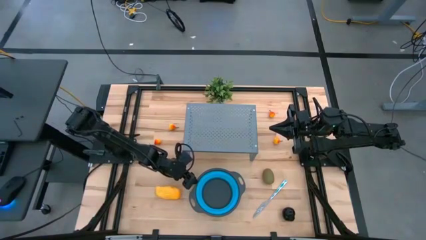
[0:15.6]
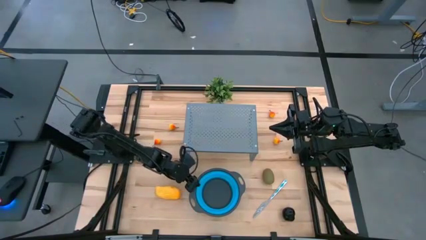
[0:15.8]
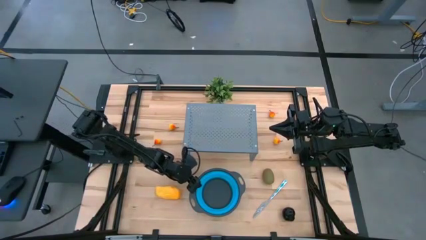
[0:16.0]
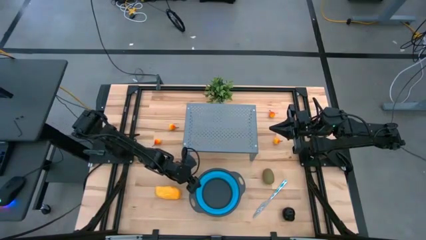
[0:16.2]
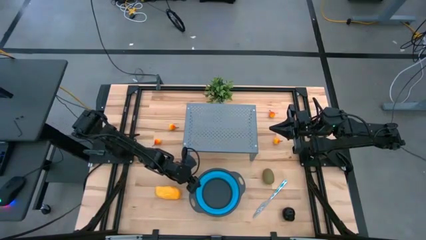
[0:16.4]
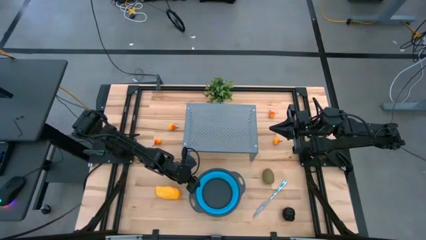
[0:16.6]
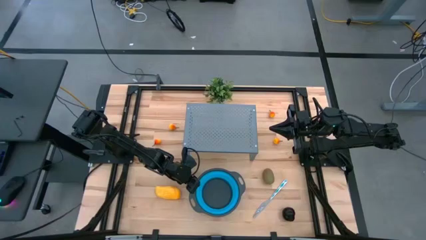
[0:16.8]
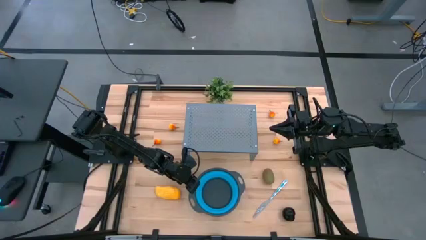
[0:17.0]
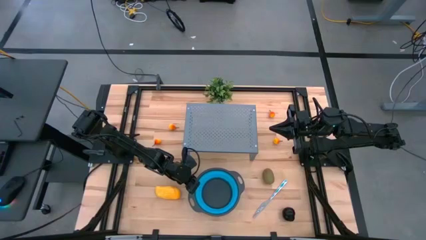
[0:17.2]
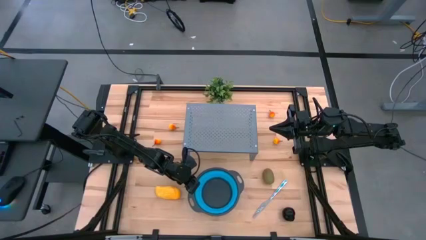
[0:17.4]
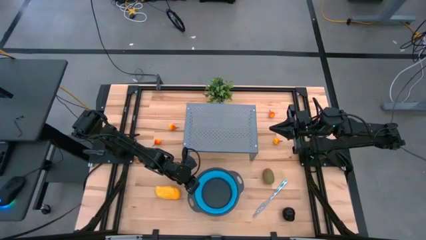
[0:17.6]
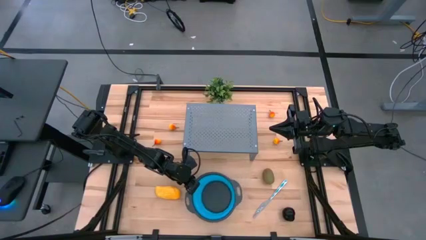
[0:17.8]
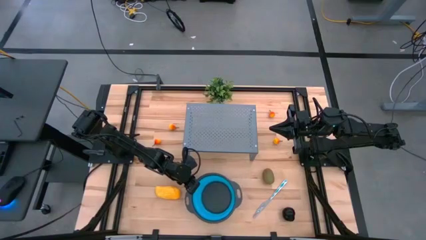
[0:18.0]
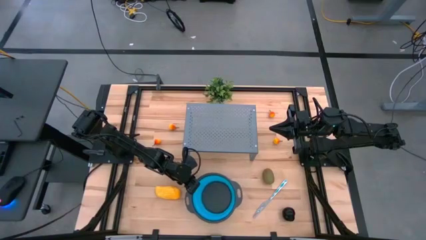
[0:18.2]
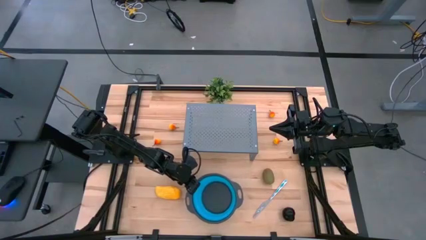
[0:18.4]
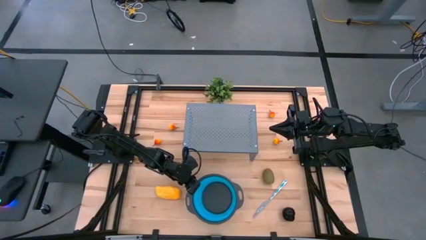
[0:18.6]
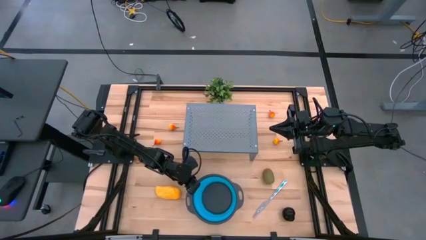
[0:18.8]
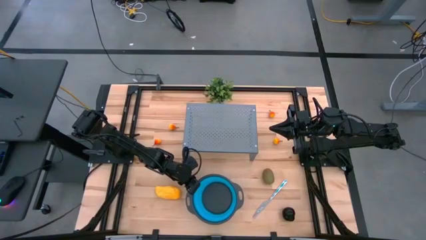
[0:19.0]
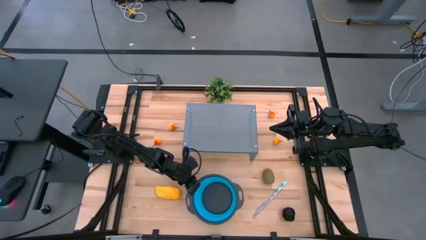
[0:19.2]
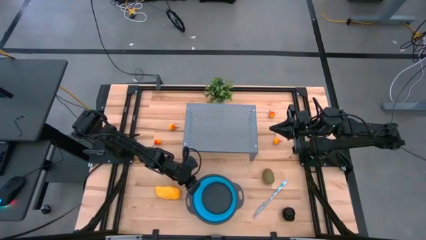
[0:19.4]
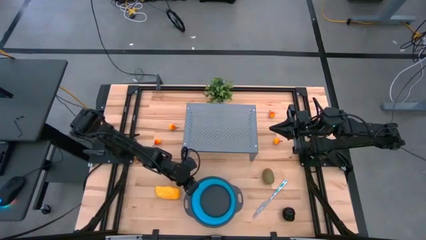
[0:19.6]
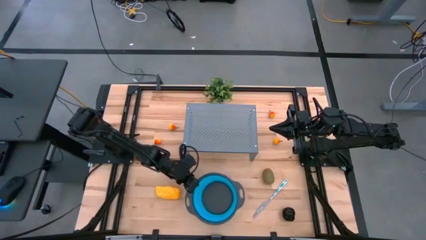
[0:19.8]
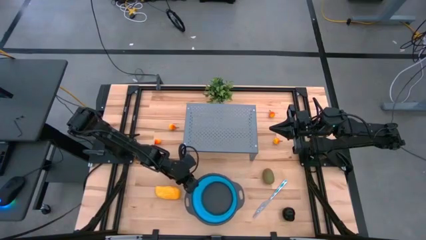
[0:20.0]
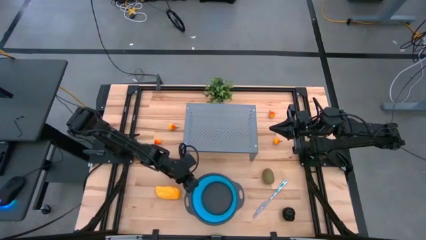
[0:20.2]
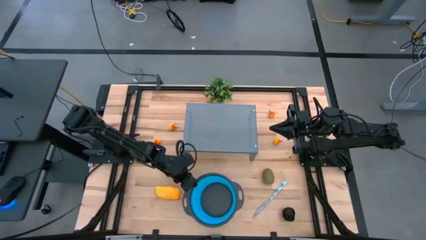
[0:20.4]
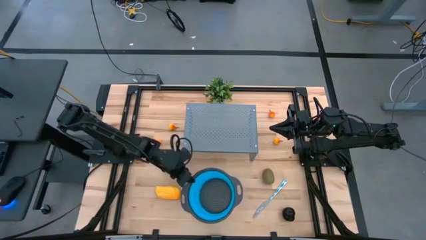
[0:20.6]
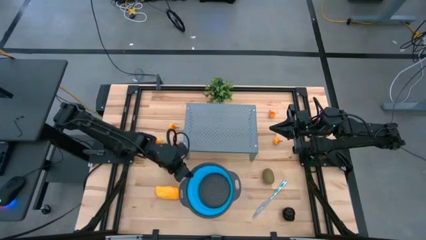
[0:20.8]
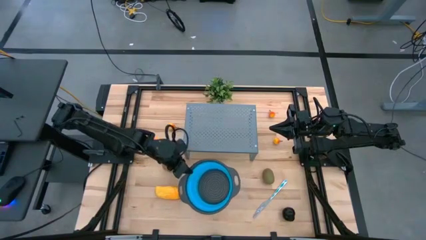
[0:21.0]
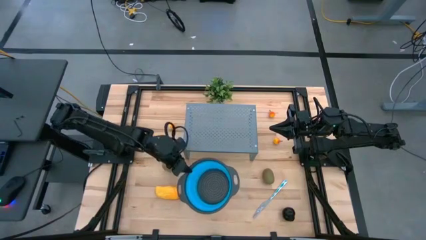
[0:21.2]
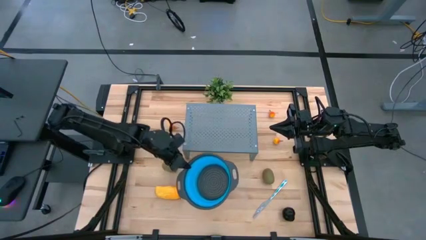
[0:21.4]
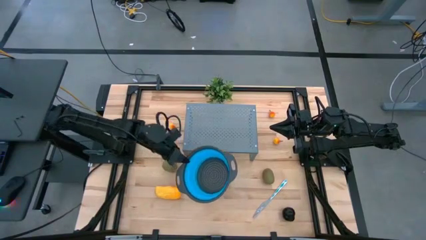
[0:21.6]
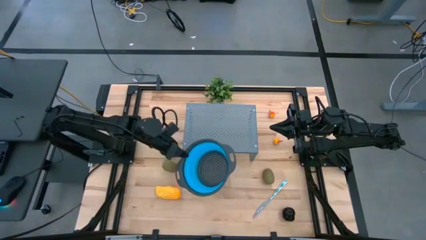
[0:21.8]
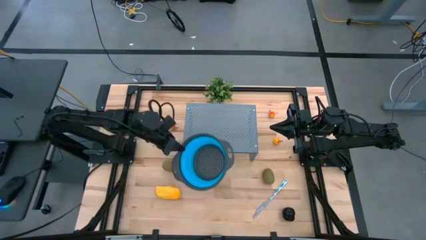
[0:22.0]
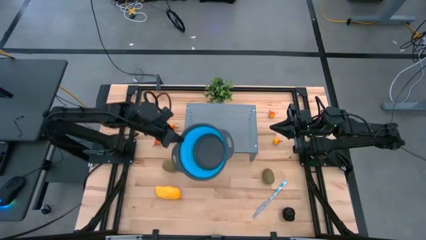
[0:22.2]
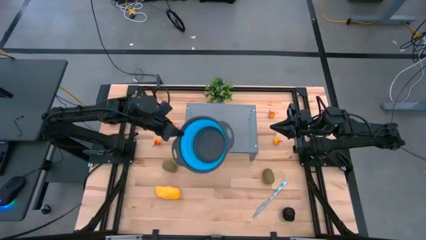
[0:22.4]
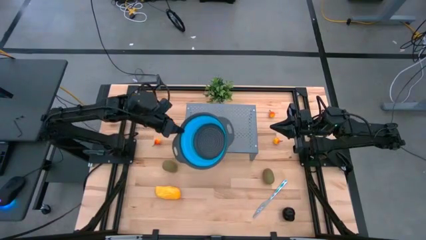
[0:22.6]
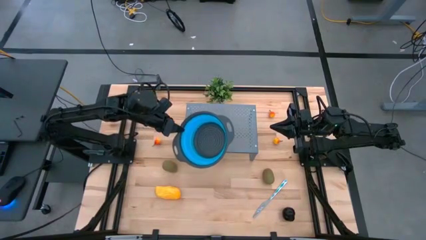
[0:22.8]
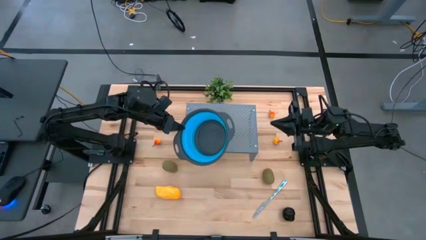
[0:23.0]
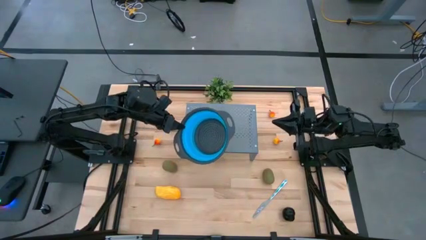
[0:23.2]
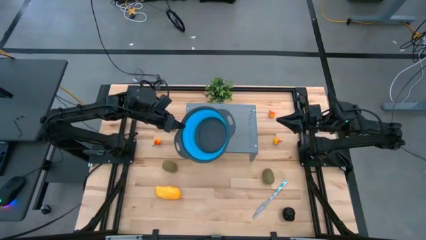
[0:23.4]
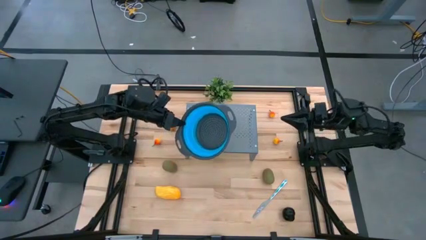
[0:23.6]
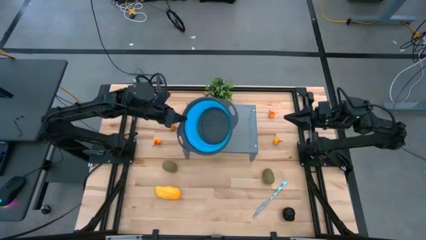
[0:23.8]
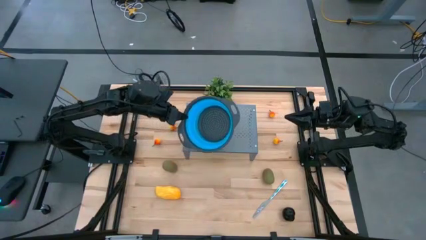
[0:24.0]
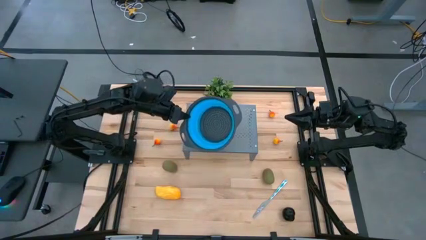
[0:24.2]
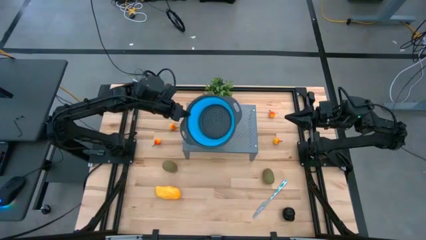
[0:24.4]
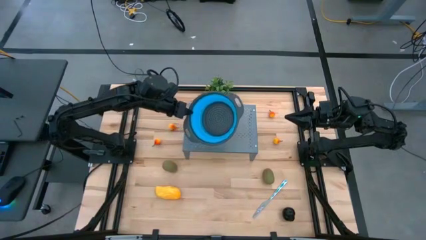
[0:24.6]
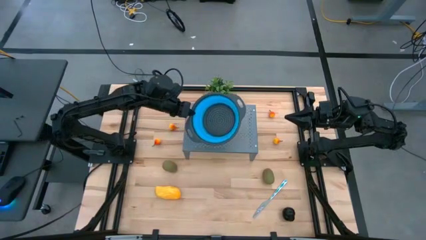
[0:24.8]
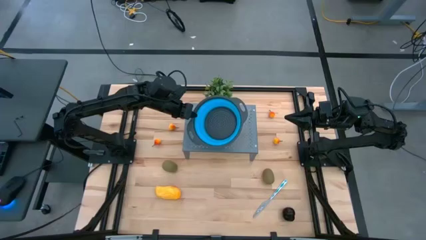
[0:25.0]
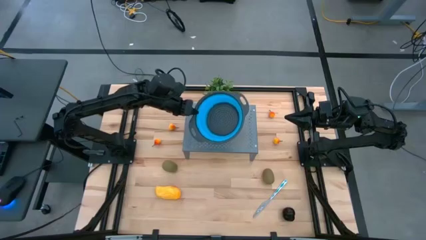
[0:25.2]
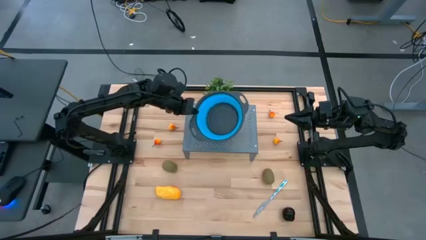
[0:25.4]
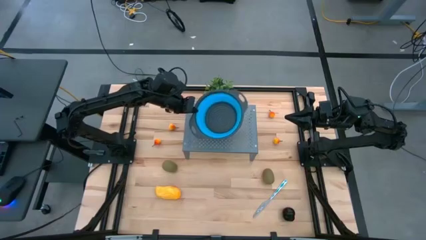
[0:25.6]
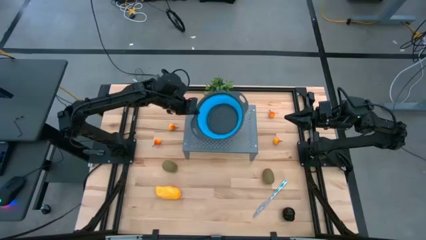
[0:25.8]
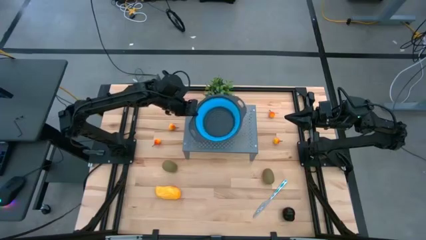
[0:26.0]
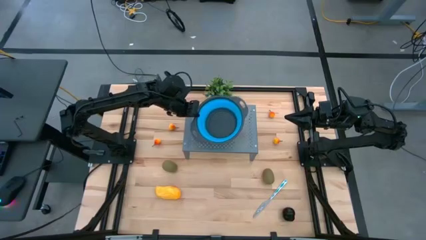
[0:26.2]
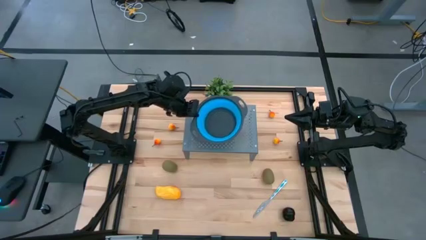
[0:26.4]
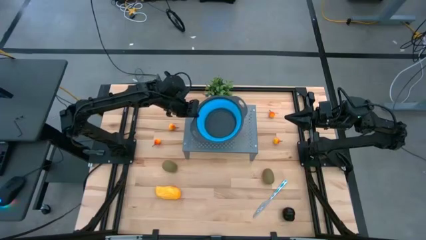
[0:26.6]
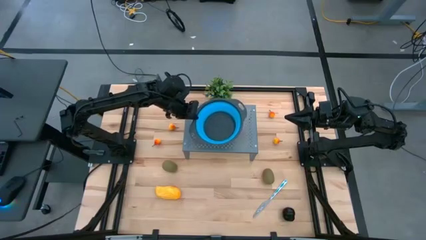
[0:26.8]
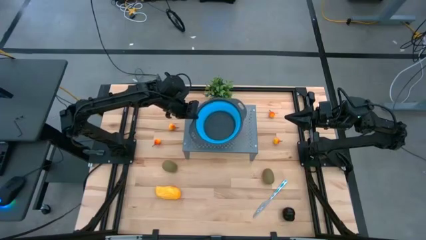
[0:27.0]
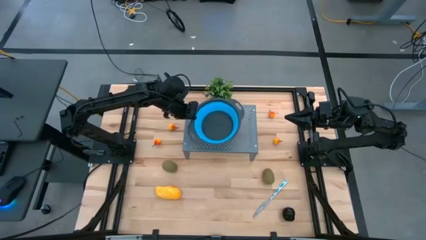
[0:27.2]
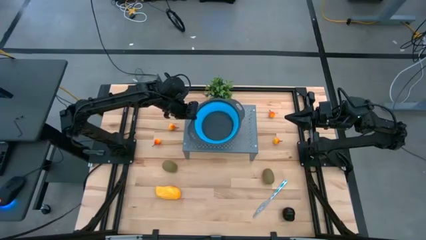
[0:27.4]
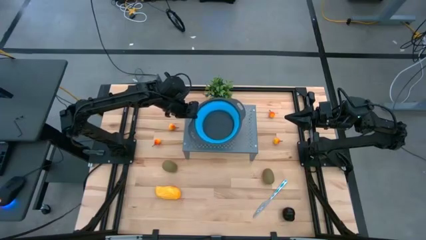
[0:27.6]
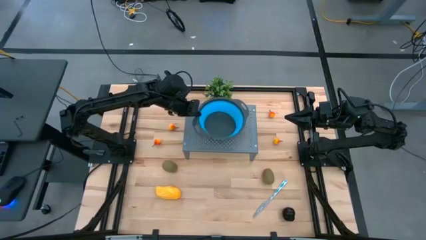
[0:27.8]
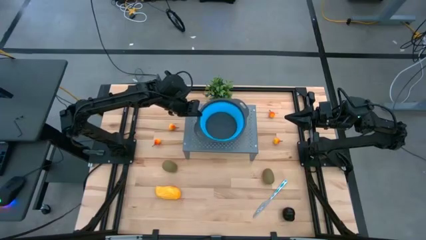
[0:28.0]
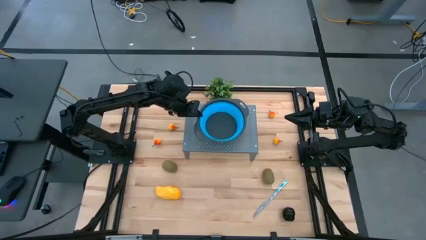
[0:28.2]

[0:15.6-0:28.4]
Task: Pick & Place Fruit
Put the strainer bowl on the shelf

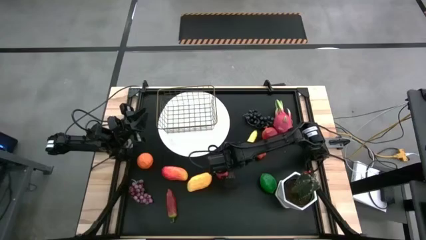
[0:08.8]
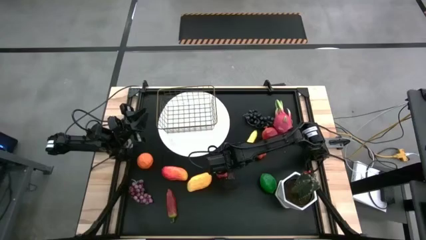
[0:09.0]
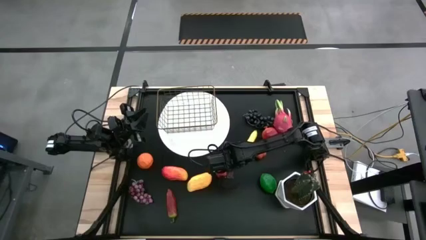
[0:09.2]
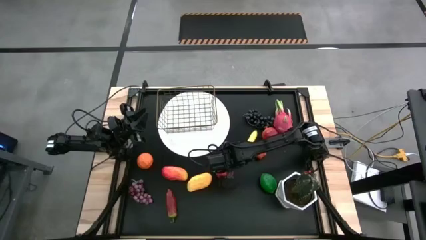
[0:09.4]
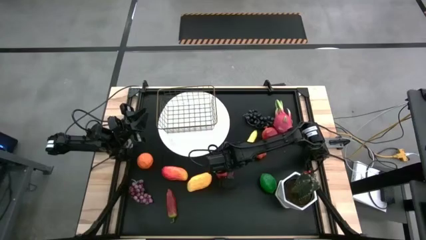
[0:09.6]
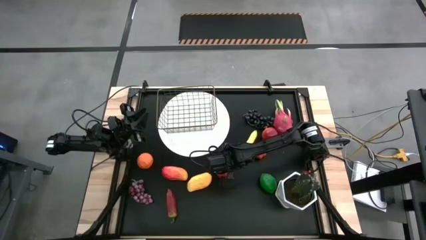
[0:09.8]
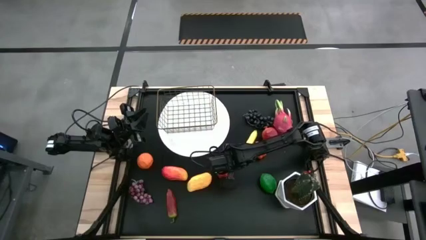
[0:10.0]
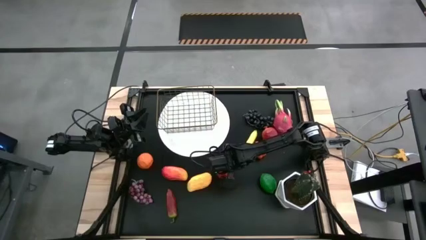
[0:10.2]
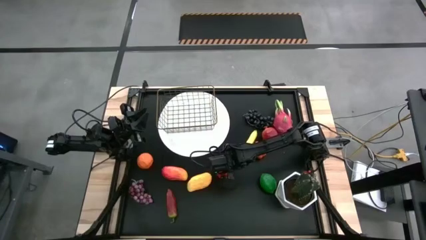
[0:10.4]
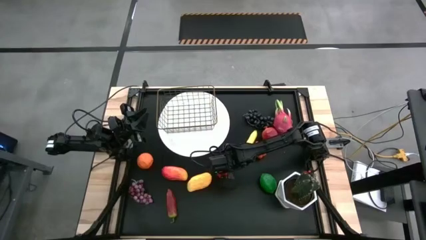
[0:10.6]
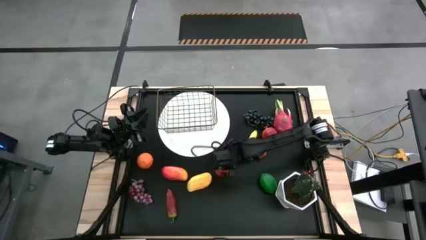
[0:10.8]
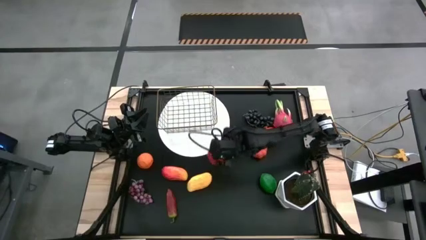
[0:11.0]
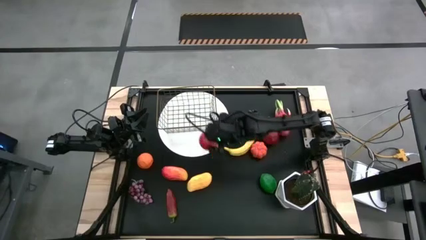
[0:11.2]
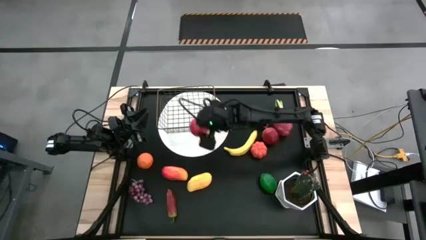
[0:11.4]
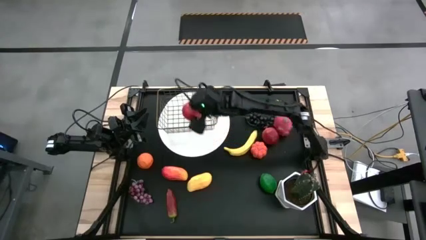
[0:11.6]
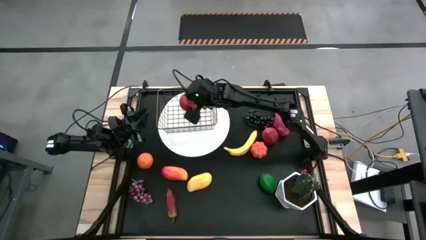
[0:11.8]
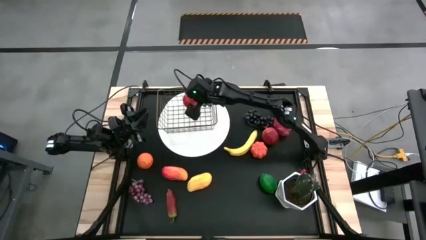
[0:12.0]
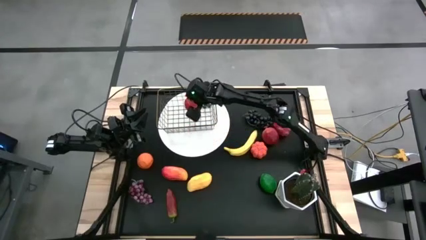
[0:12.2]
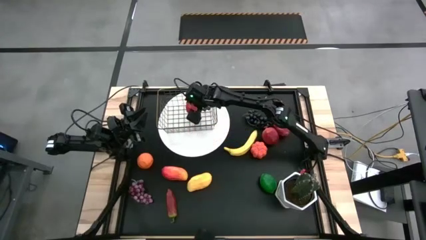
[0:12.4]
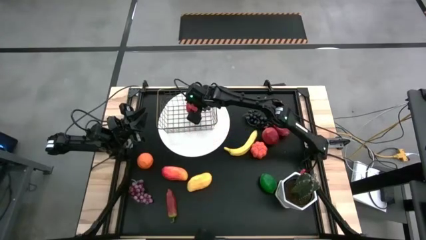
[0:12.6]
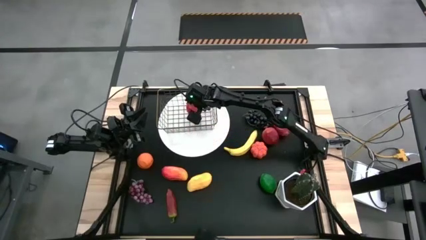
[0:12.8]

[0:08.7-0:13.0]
Task: Build produce basket
Put the red apple into the wire basket
